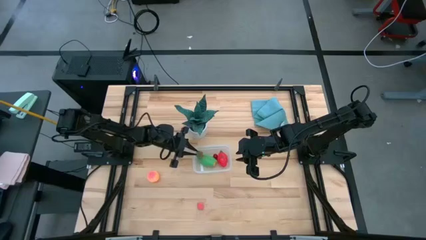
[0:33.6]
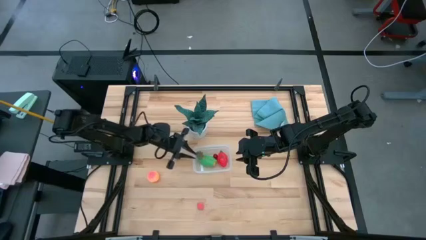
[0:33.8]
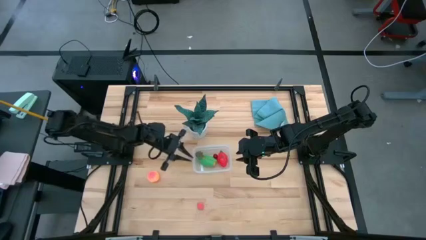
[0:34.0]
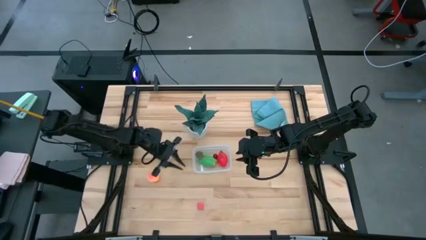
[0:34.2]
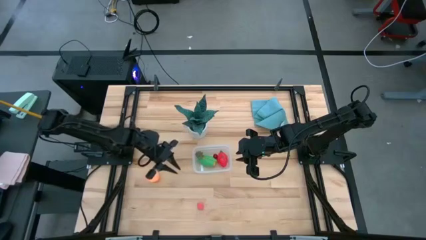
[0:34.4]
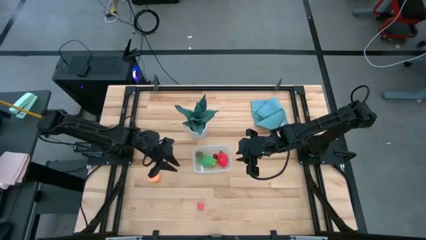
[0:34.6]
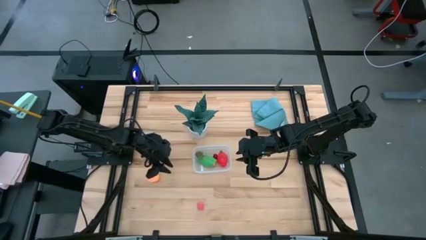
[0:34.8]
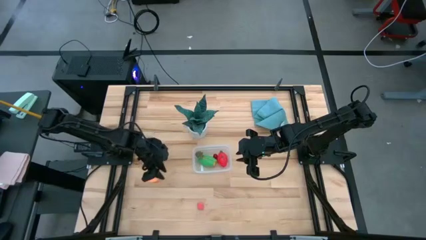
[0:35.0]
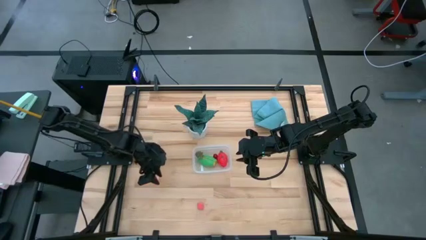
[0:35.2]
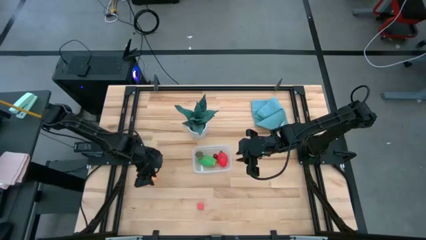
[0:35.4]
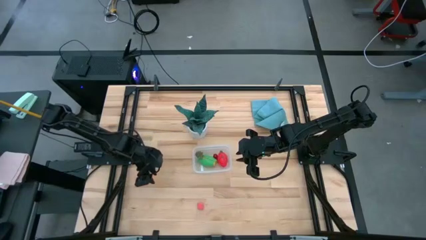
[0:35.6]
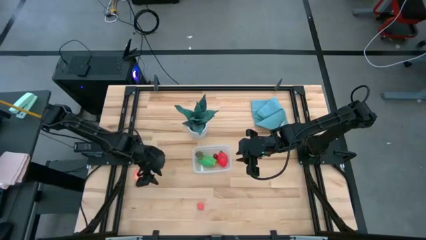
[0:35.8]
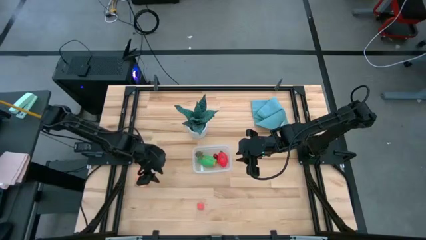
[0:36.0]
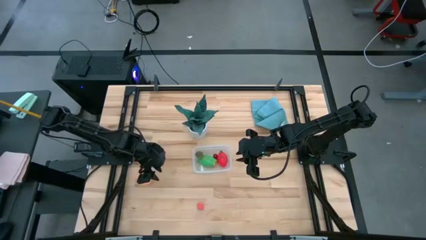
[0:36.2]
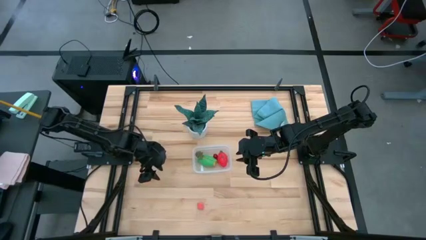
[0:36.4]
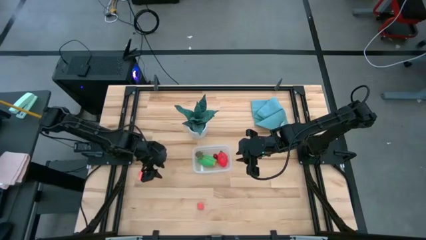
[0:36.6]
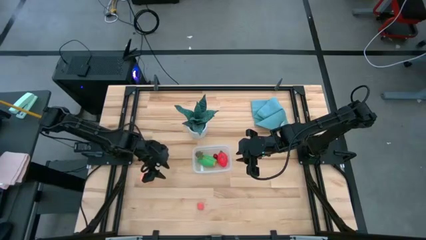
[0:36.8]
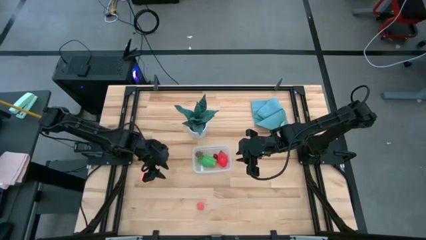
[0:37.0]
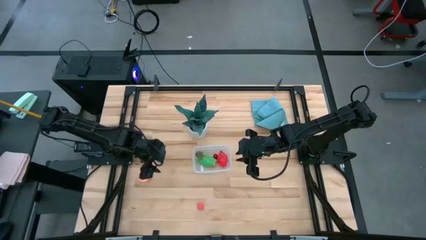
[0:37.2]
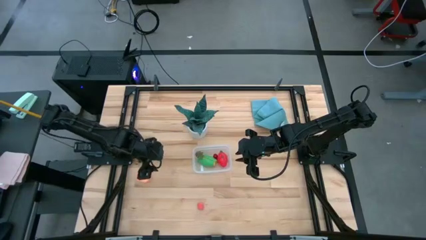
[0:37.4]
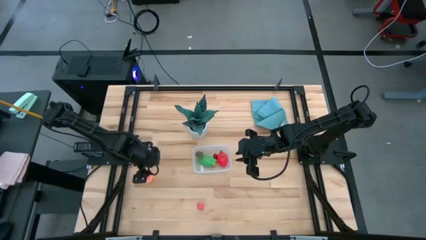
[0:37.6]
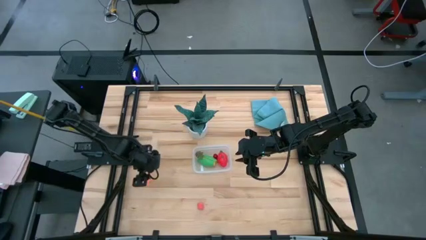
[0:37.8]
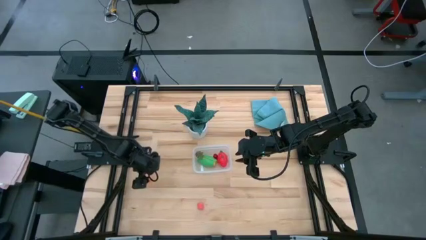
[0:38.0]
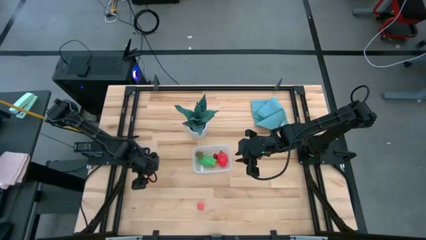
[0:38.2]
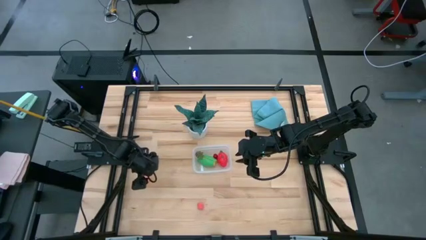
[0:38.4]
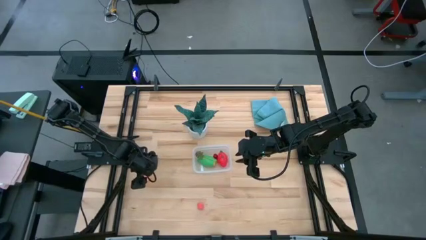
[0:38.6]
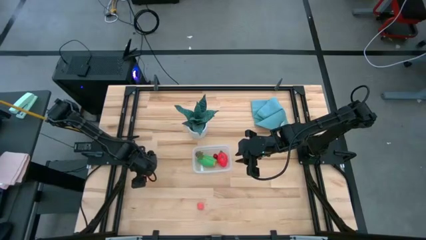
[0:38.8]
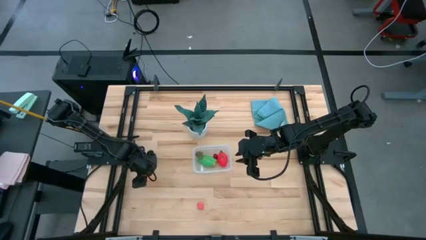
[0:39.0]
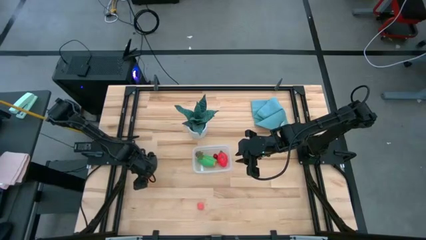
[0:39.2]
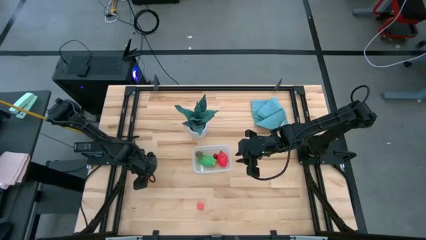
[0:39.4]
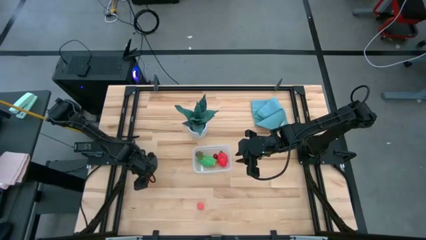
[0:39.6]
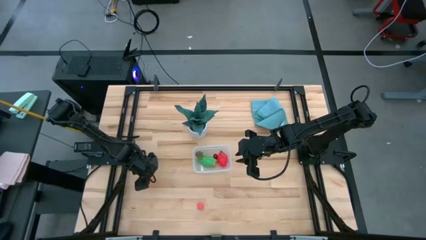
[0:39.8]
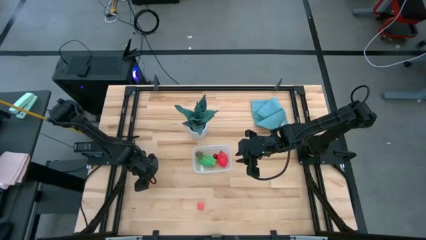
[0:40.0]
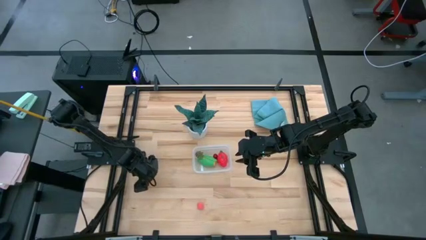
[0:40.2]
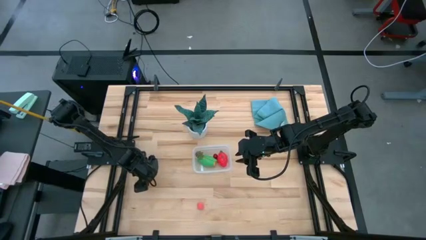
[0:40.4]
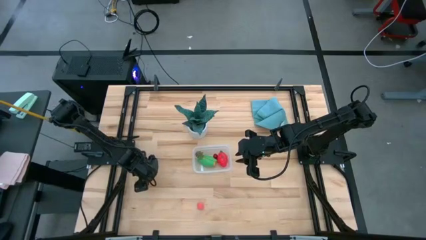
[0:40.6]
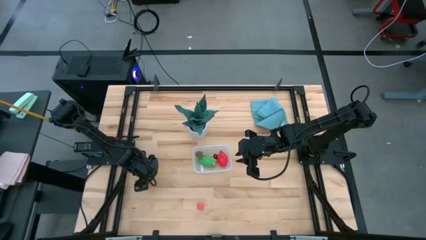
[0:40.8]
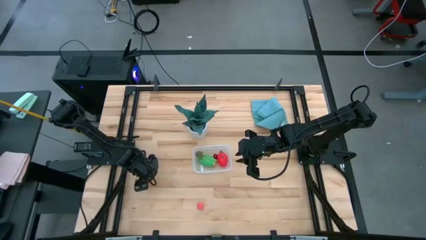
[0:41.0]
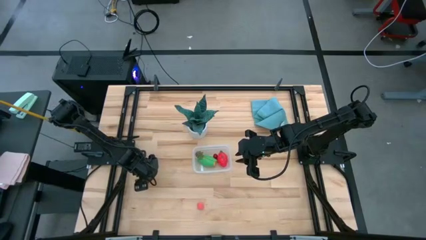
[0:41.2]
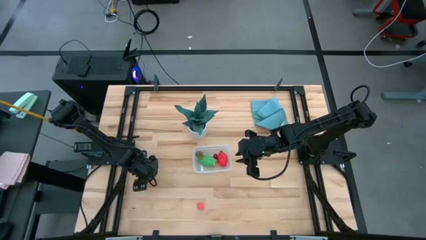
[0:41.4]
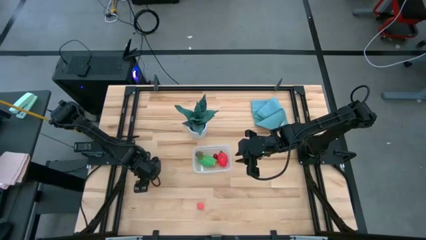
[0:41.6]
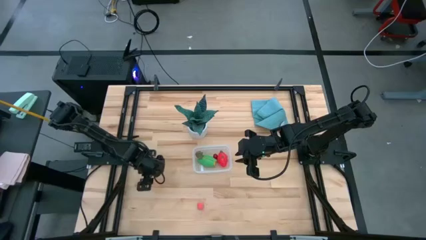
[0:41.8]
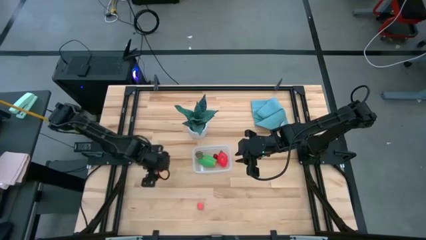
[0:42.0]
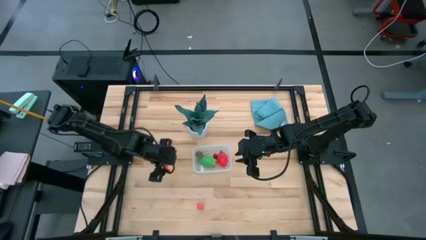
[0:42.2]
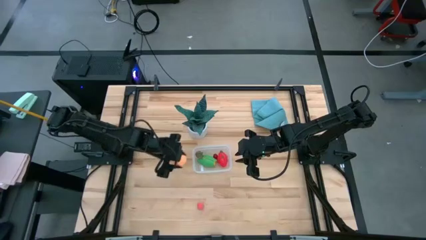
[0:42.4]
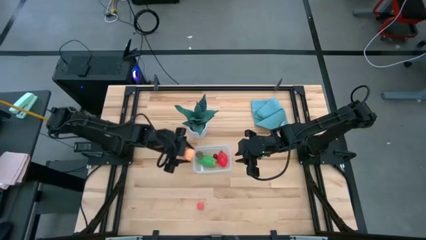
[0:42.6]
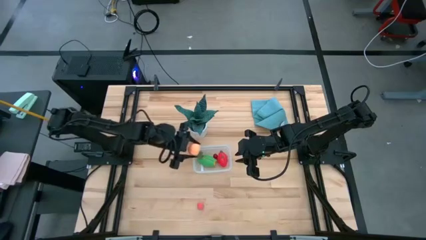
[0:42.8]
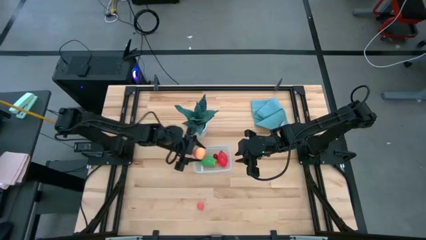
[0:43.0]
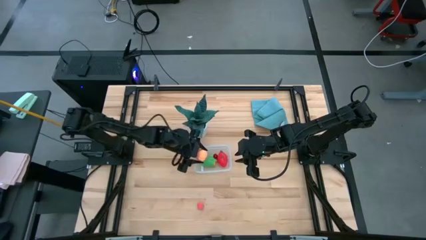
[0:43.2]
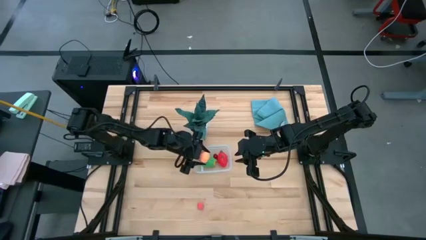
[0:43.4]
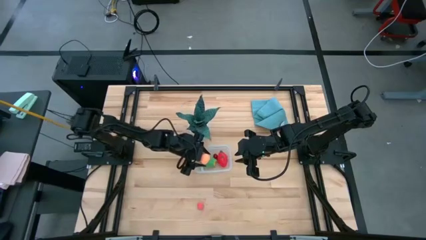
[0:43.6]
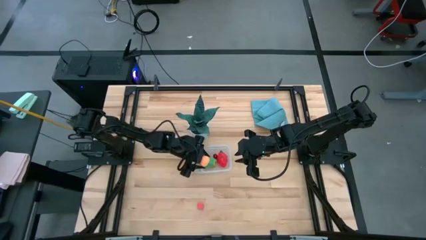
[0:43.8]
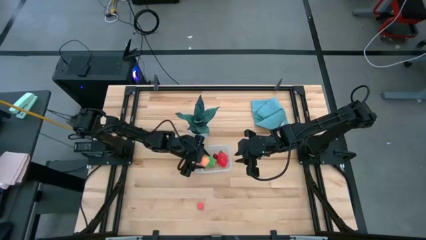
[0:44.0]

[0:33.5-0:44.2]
Task: Pick and placing Produce into tupperware
Put the orange peach into the transparent container

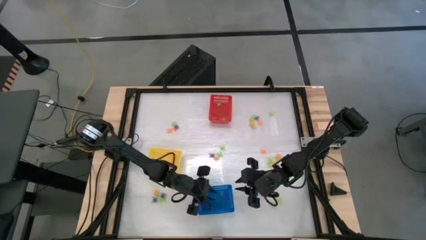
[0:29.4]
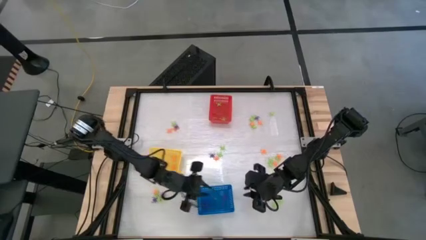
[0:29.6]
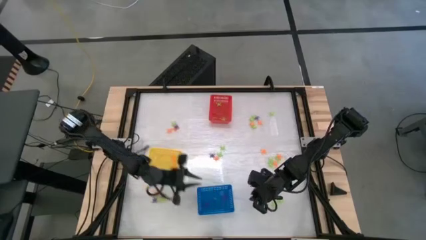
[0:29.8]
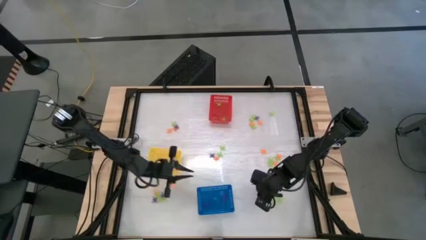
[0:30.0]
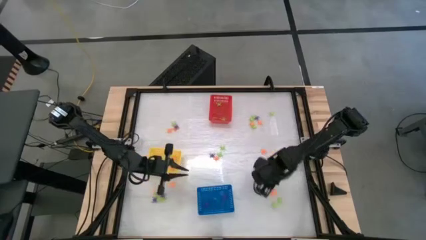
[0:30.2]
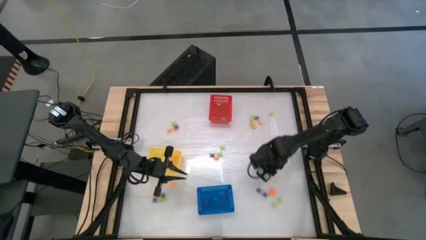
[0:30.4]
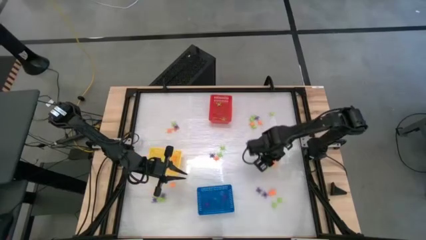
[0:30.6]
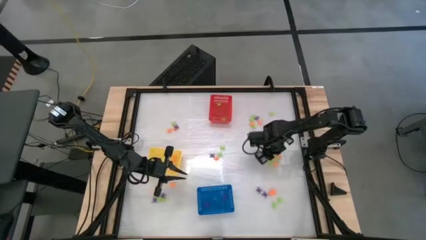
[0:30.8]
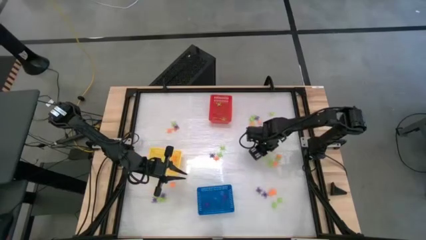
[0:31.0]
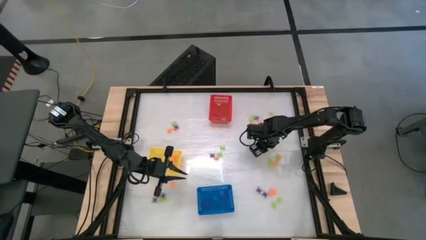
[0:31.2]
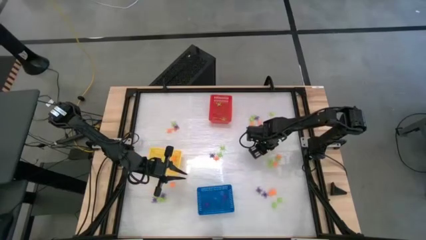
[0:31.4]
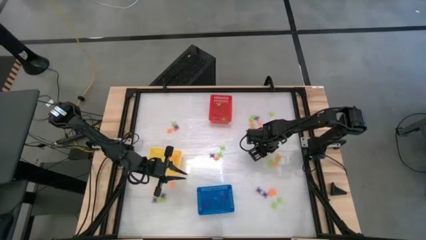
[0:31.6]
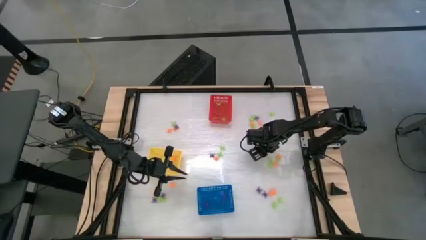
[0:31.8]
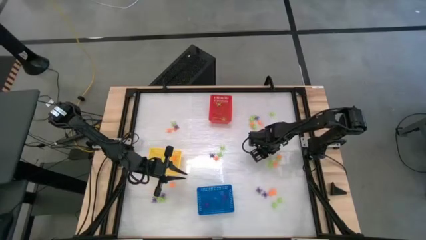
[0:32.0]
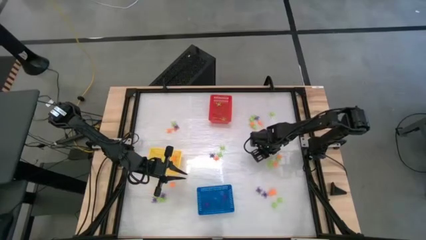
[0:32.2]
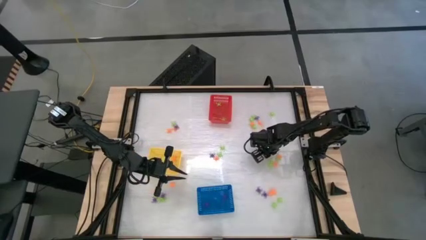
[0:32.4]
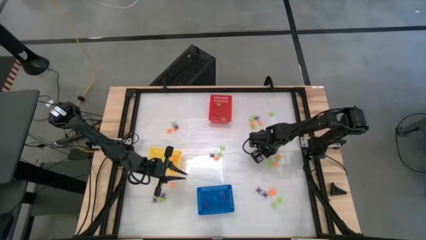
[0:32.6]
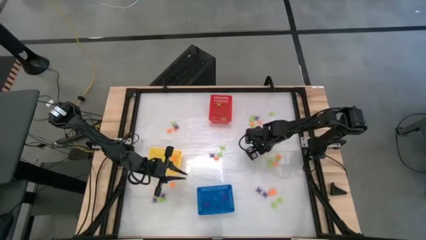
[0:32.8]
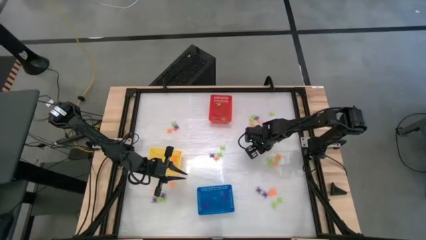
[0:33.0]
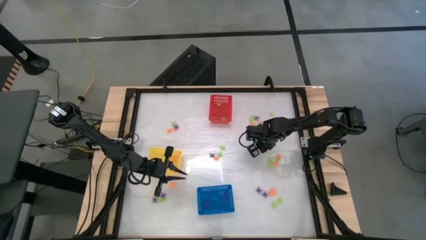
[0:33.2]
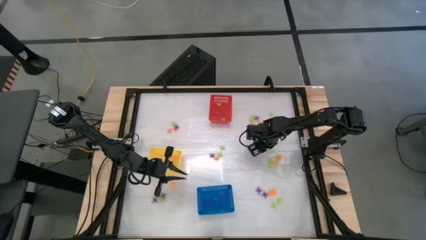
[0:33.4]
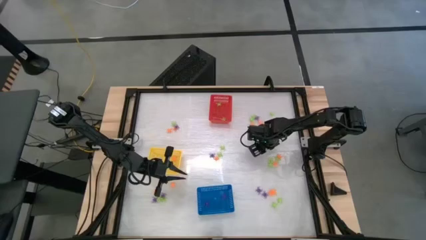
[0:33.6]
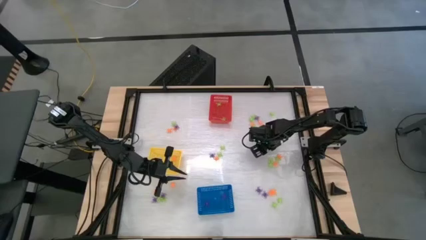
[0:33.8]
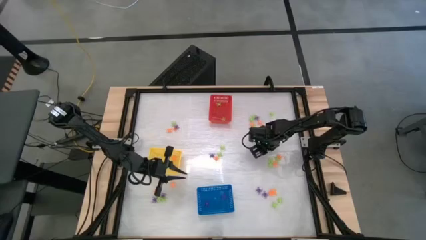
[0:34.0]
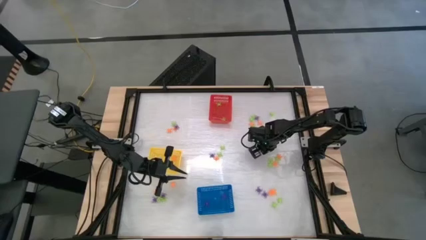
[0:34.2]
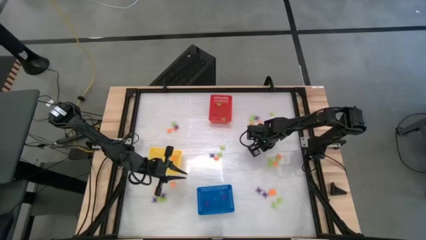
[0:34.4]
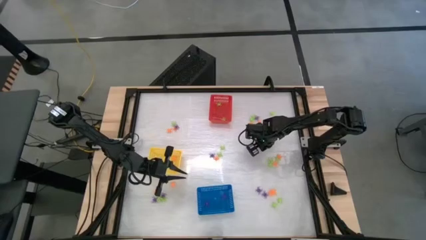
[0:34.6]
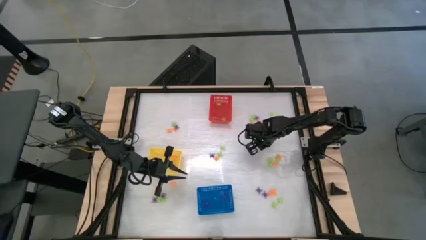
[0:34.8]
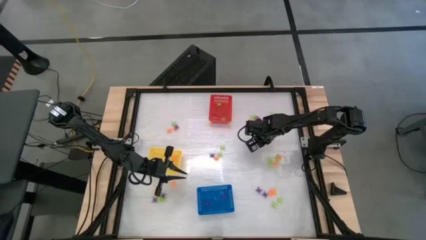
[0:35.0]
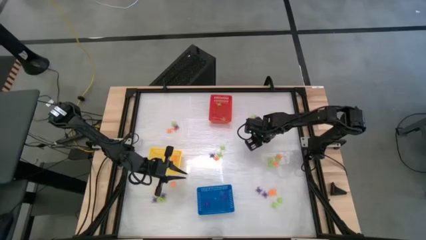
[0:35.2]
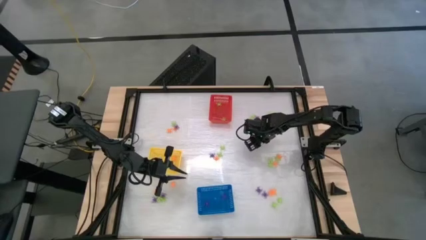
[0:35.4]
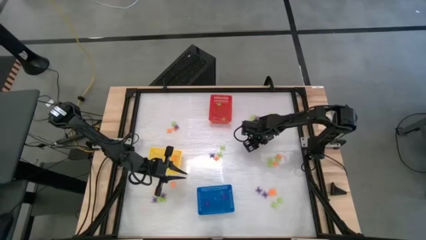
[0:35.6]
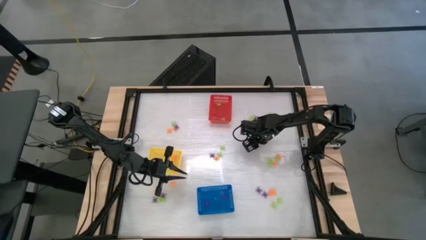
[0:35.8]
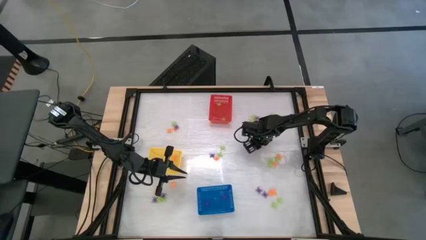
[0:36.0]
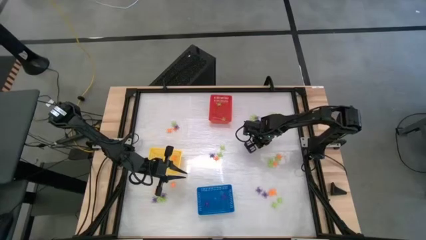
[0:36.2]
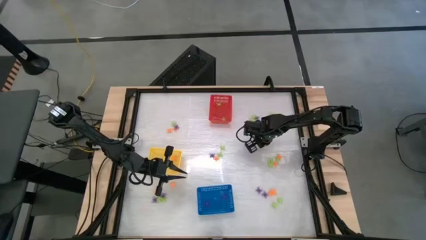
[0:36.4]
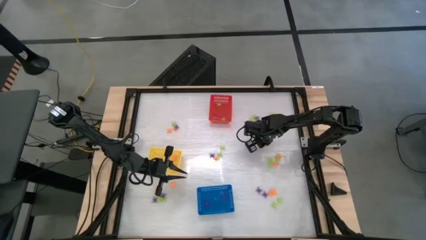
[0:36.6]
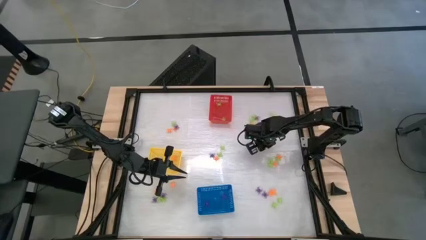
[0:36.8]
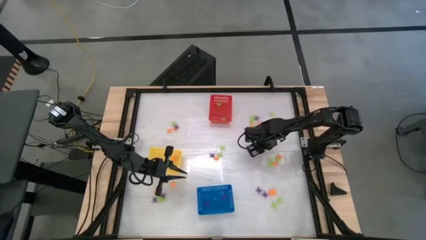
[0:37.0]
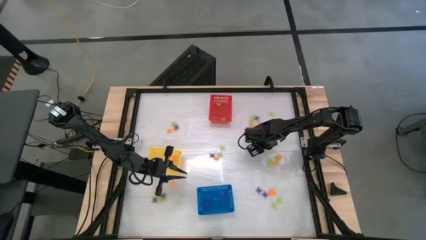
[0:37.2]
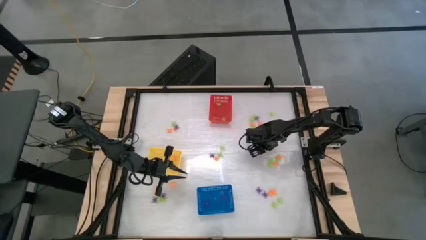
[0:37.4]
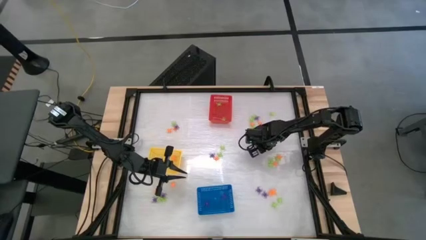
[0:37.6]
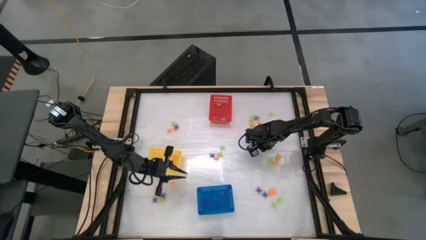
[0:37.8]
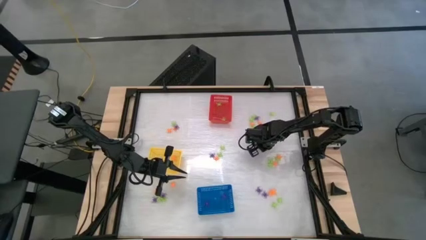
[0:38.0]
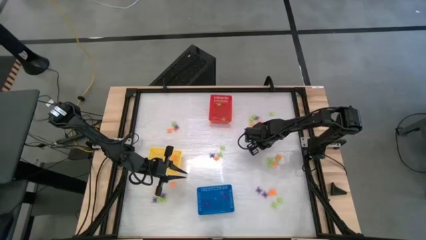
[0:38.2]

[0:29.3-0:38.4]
Task: Sort Halloween decoration
Put the orange spider toy into the yellow basket
